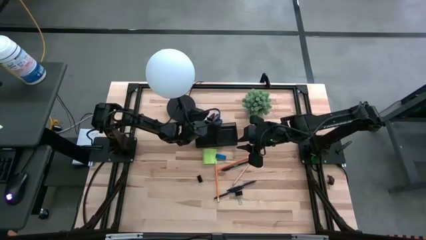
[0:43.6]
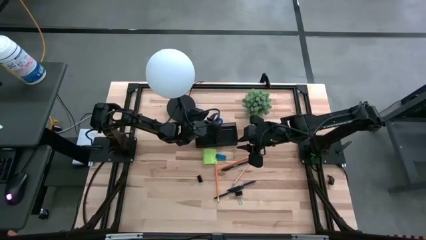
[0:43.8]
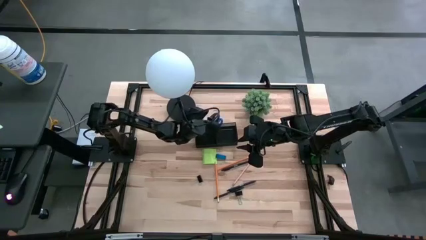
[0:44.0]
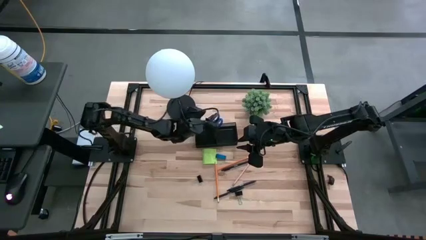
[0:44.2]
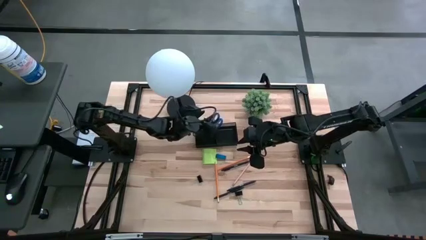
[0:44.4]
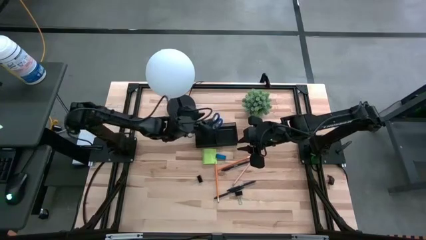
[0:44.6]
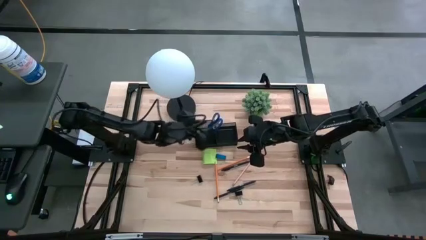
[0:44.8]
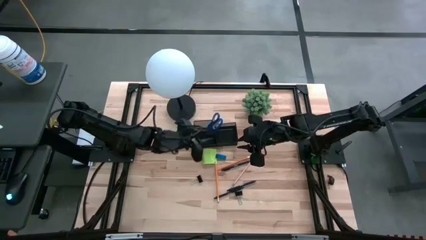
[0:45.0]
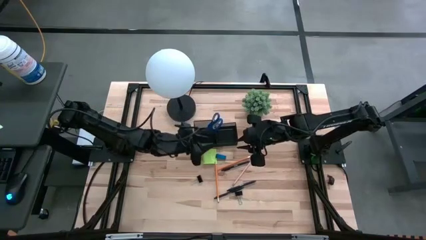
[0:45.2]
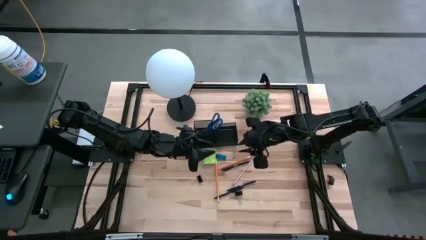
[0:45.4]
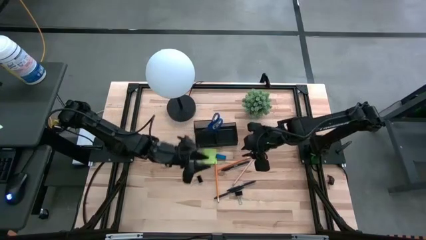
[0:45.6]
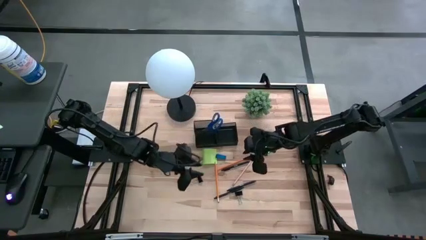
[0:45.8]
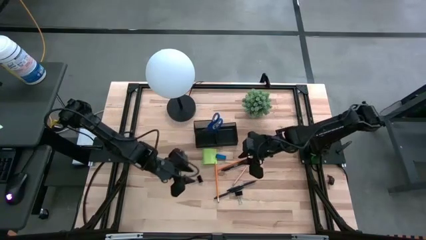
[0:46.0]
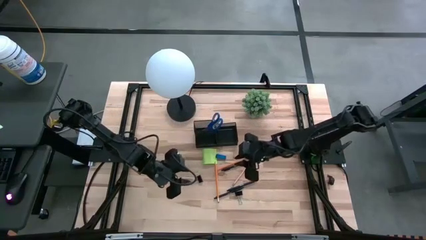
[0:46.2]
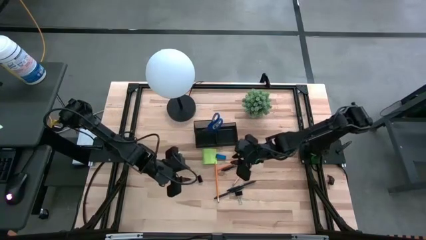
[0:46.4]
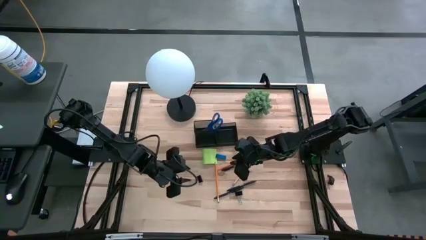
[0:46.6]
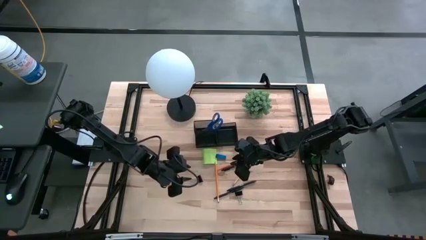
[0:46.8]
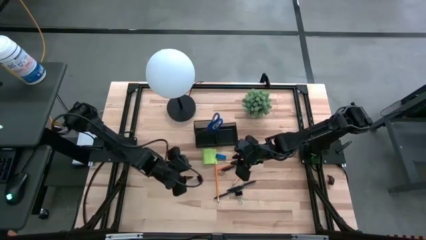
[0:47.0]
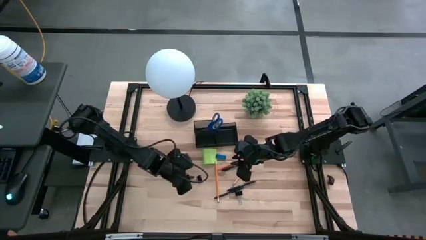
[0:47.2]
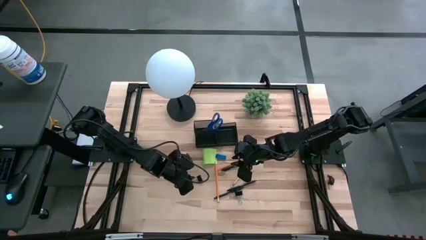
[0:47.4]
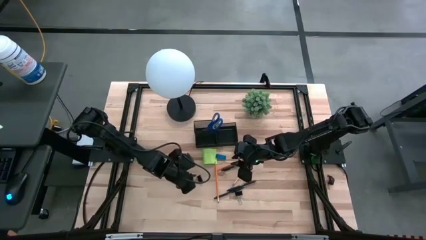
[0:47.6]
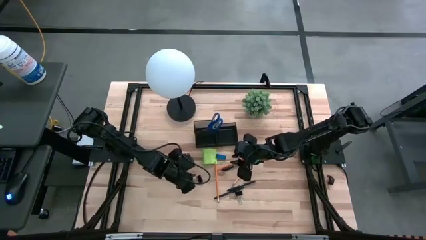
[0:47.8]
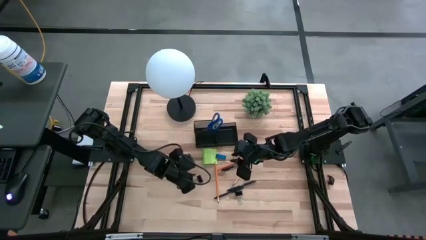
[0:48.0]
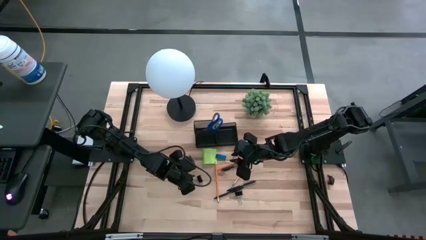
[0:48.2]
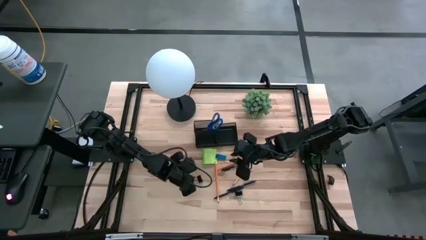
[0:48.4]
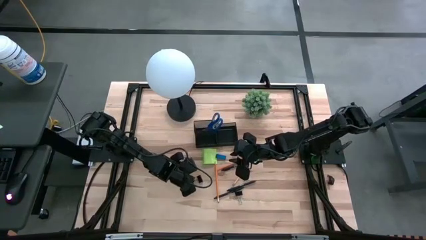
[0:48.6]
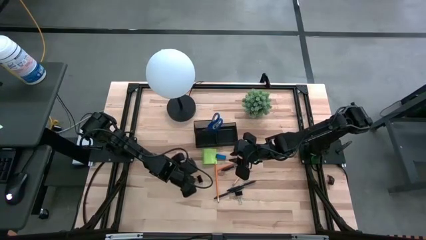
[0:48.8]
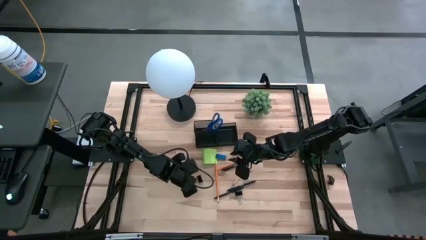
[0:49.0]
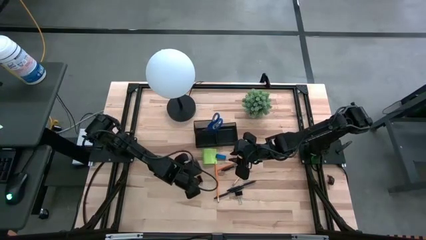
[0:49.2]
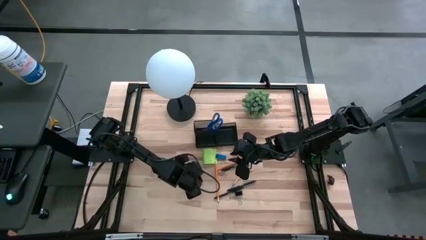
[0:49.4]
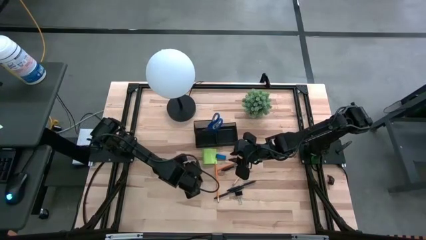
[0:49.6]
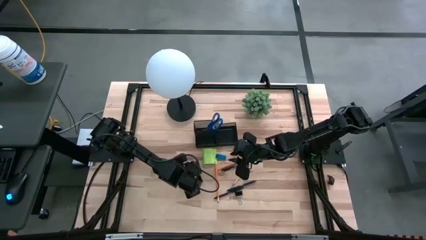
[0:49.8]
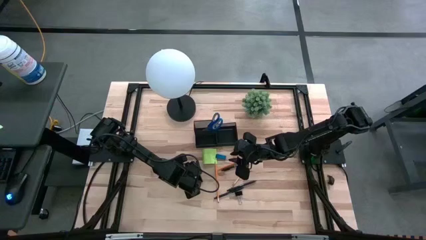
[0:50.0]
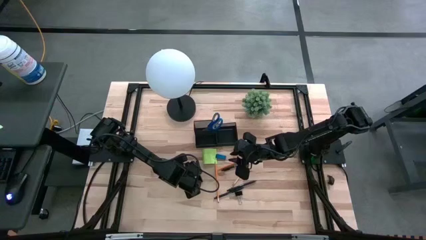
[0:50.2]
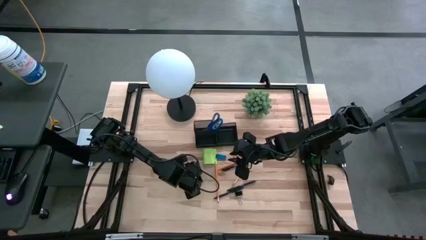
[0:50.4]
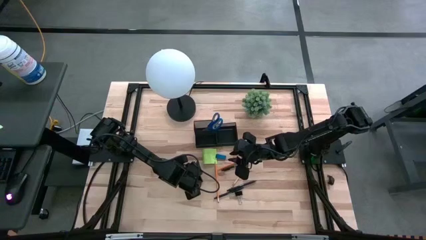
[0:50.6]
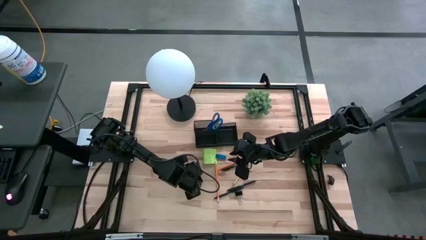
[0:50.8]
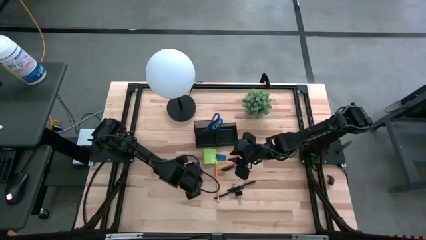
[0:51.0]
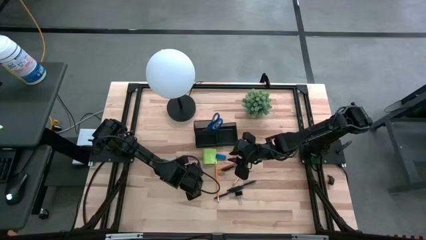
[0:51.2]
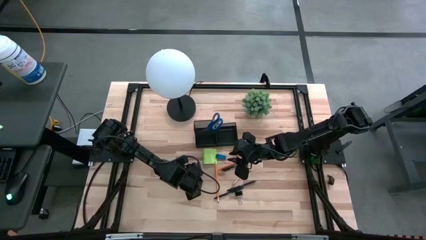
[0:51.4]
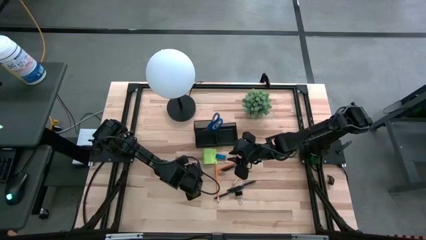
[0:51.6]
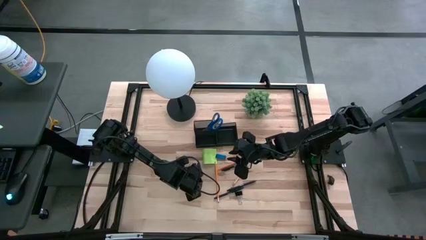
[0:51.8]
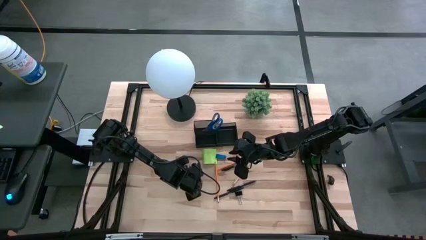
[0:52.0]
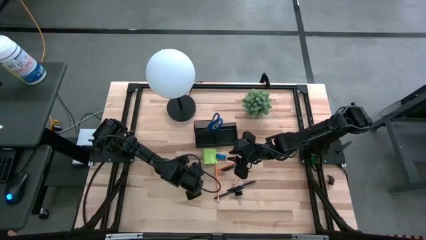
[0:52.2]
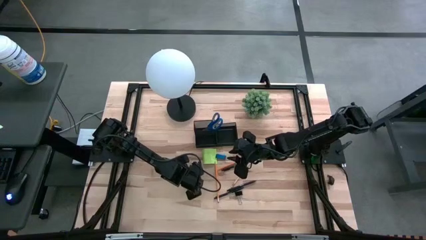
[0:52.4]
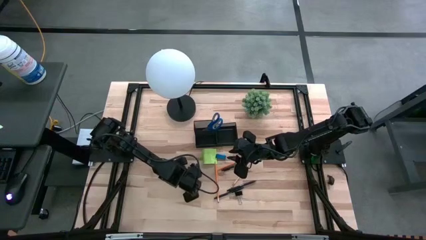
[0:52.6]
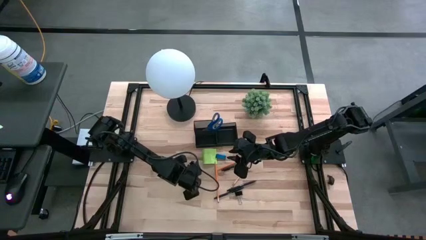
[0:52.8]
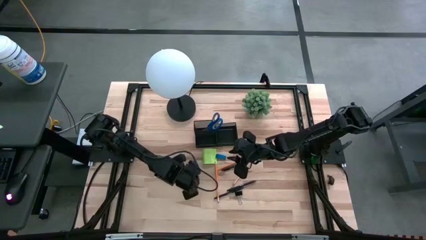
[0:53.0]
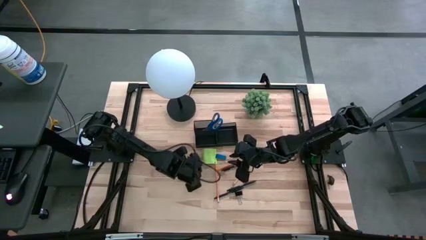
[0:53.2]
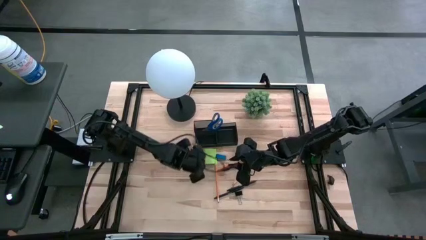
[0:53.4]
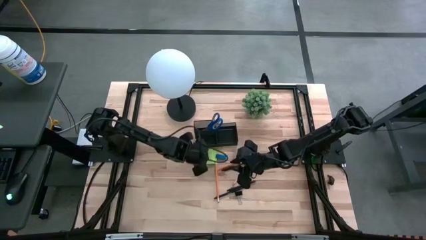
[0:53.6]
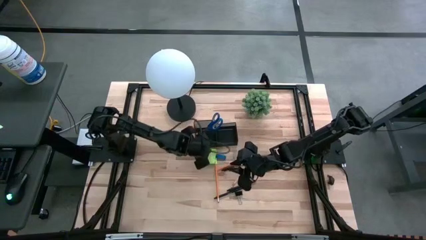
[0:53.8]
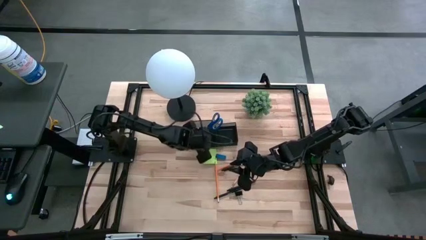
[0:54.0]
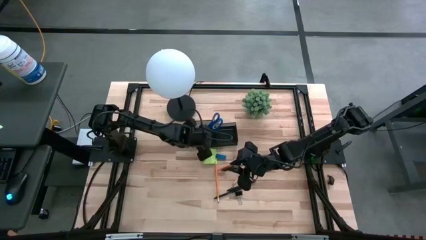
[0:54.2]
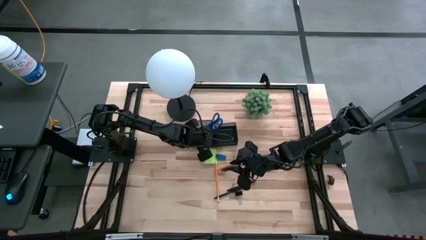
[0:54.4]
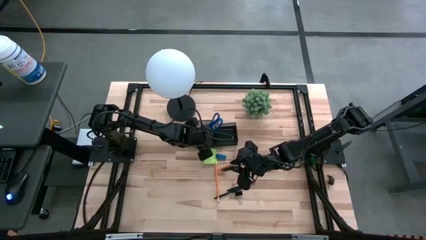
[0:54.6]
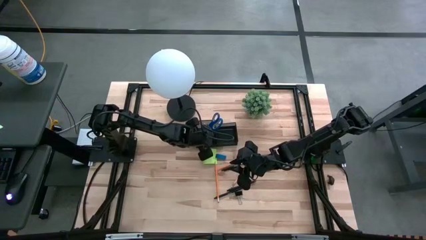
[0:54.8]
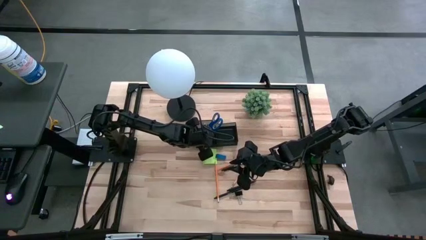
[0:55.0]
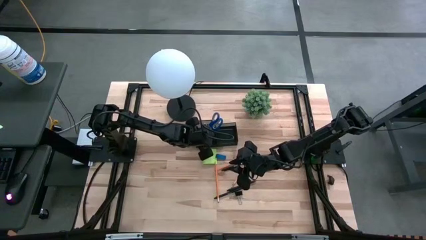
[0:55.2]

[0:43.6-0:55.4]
Task: Pick and place office supplies into organizer
Put the left black binder clip into the bottom left side of the desk organizer
